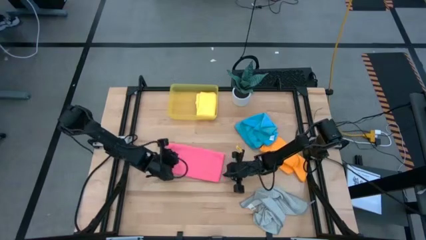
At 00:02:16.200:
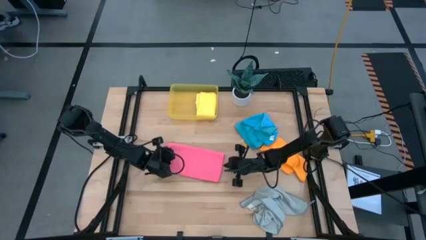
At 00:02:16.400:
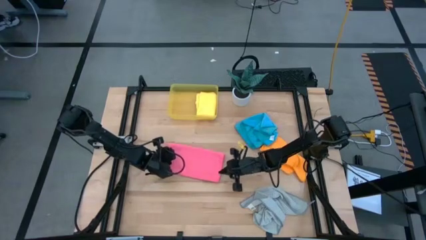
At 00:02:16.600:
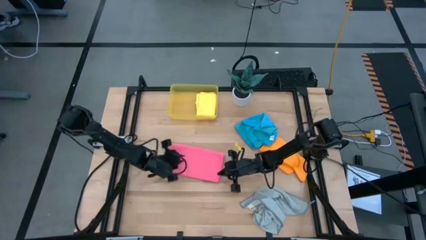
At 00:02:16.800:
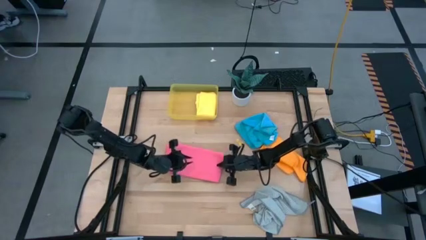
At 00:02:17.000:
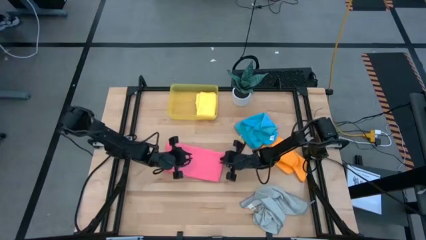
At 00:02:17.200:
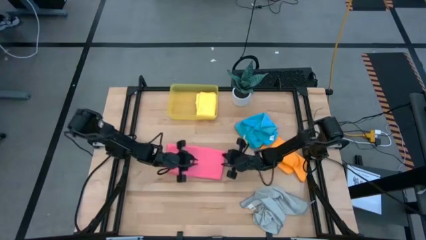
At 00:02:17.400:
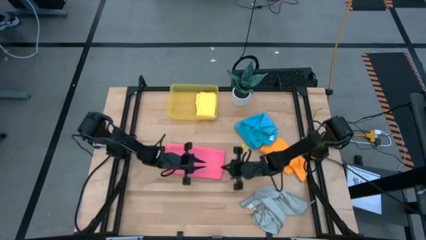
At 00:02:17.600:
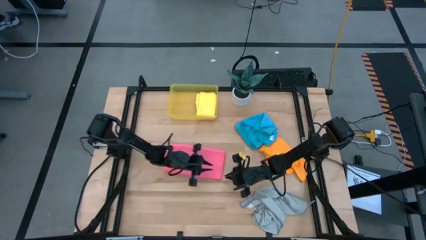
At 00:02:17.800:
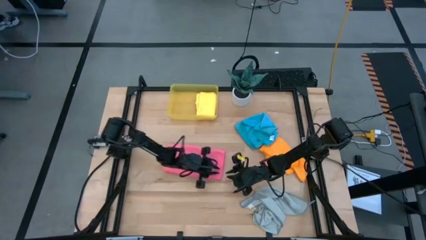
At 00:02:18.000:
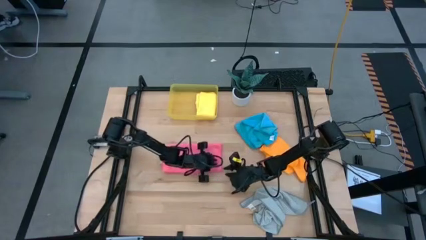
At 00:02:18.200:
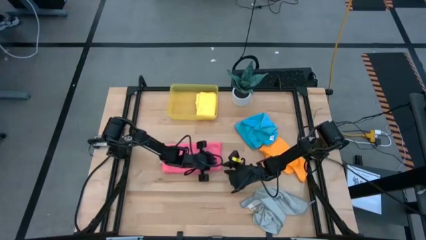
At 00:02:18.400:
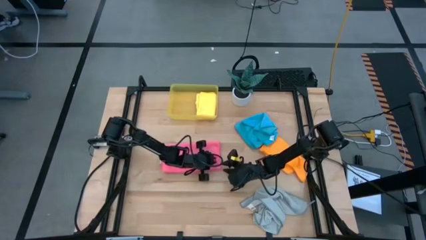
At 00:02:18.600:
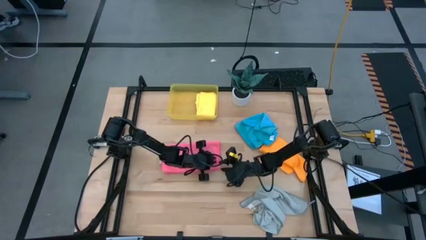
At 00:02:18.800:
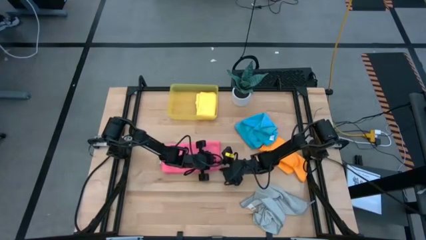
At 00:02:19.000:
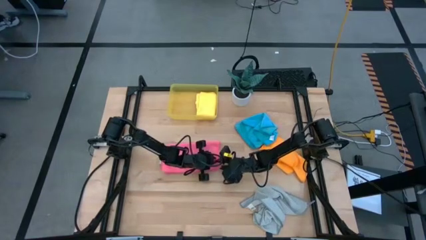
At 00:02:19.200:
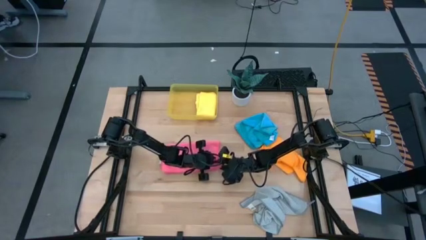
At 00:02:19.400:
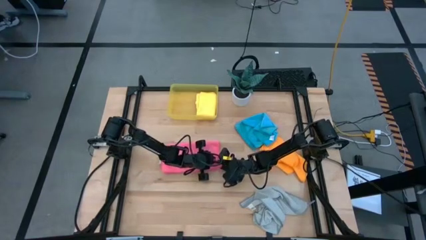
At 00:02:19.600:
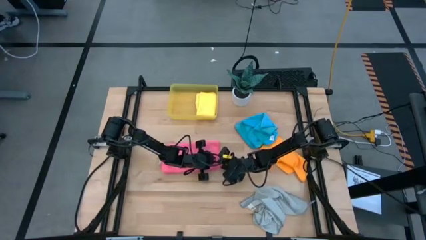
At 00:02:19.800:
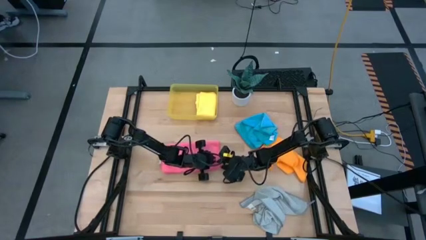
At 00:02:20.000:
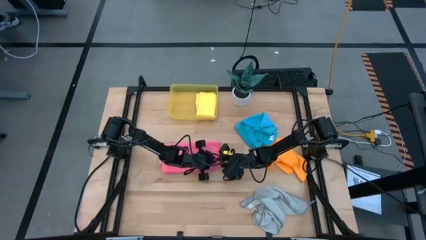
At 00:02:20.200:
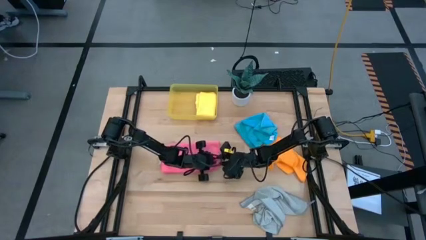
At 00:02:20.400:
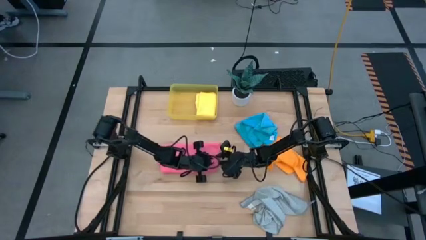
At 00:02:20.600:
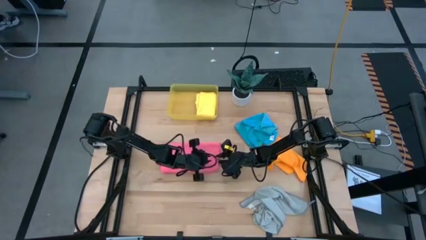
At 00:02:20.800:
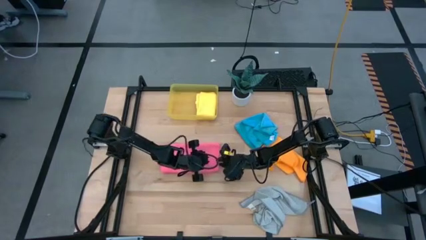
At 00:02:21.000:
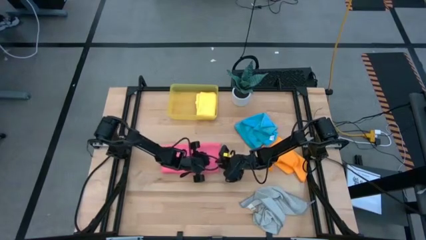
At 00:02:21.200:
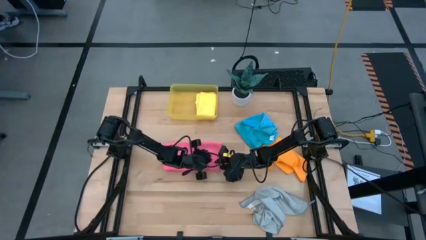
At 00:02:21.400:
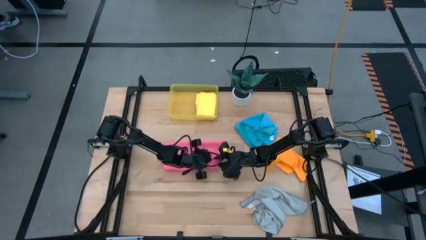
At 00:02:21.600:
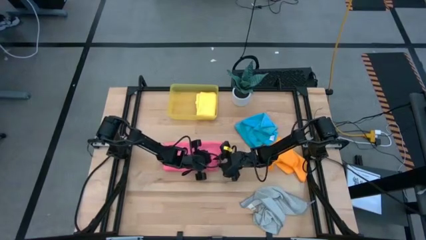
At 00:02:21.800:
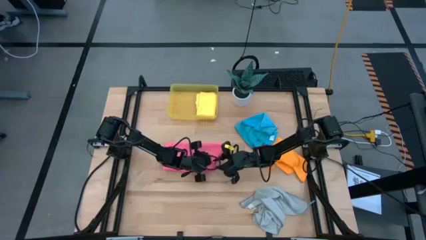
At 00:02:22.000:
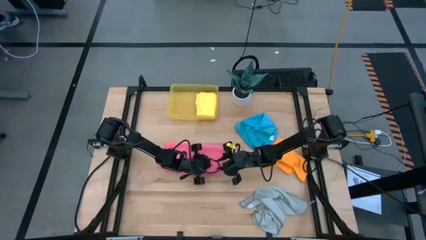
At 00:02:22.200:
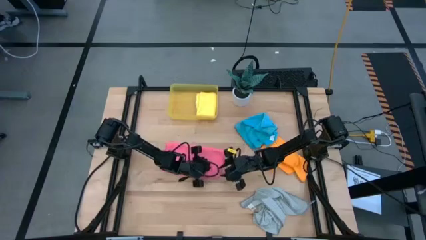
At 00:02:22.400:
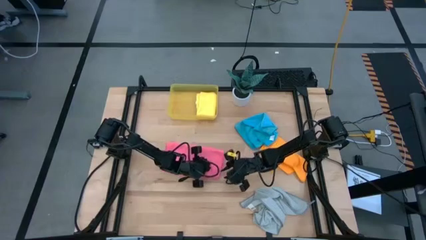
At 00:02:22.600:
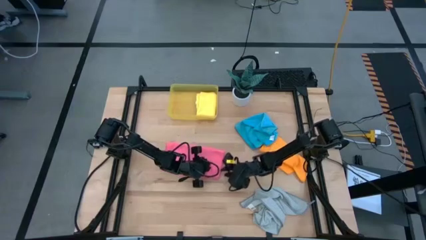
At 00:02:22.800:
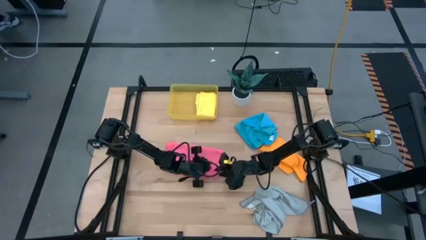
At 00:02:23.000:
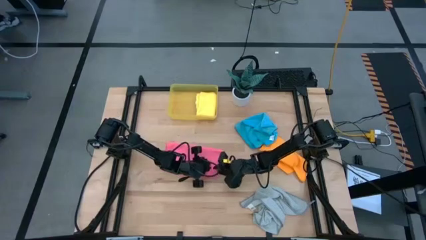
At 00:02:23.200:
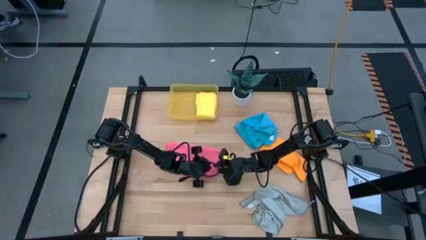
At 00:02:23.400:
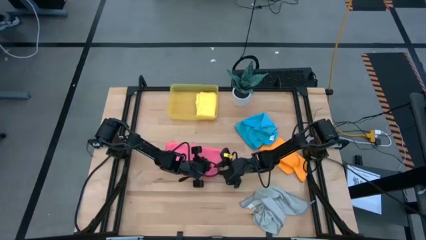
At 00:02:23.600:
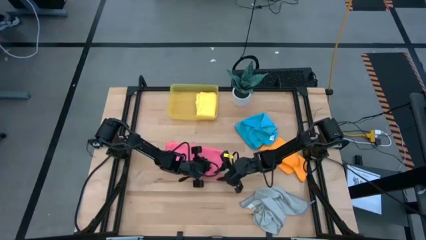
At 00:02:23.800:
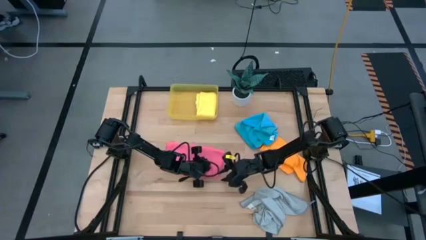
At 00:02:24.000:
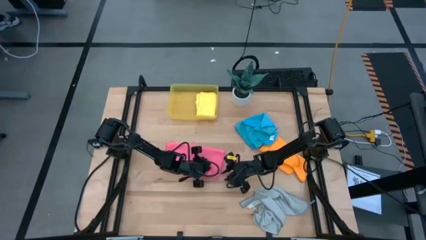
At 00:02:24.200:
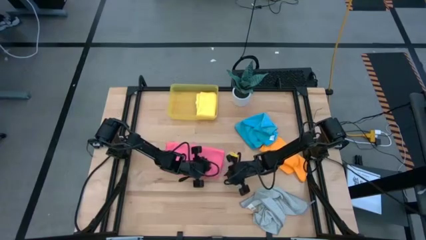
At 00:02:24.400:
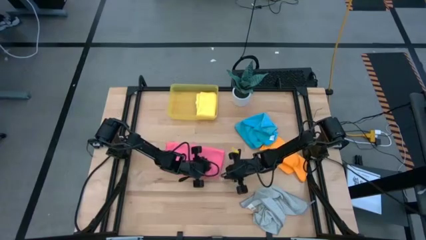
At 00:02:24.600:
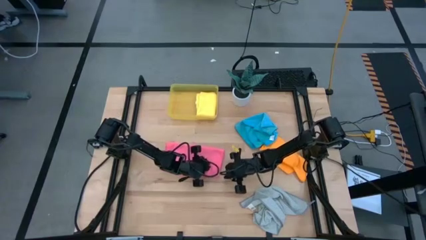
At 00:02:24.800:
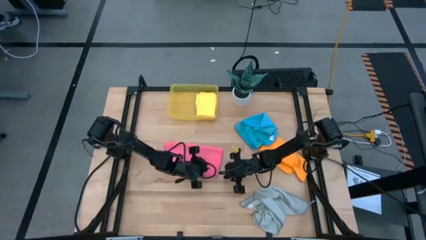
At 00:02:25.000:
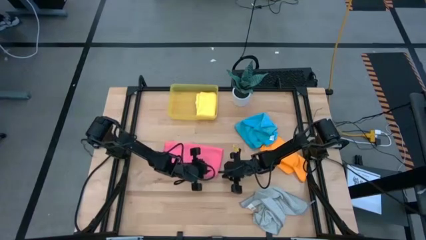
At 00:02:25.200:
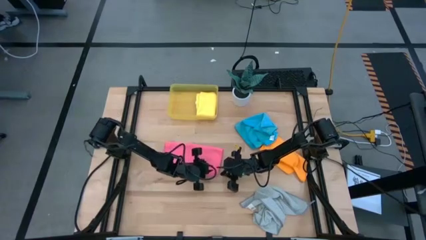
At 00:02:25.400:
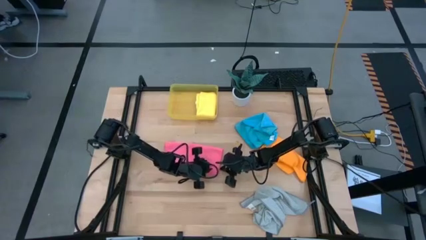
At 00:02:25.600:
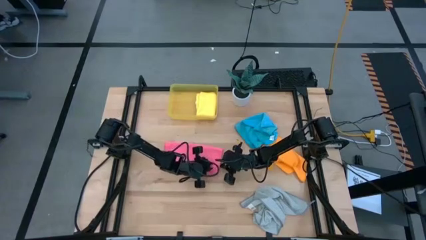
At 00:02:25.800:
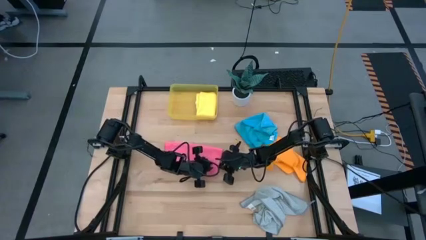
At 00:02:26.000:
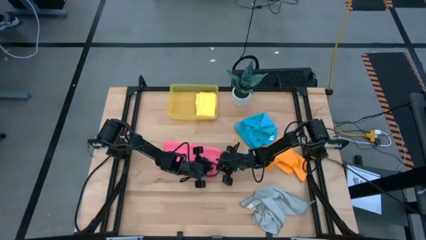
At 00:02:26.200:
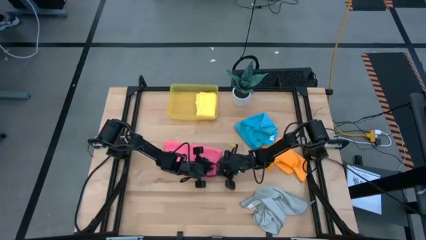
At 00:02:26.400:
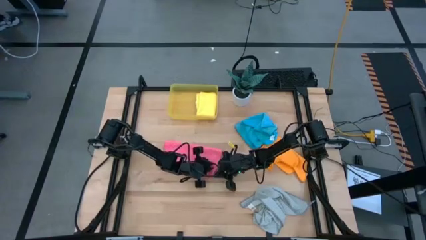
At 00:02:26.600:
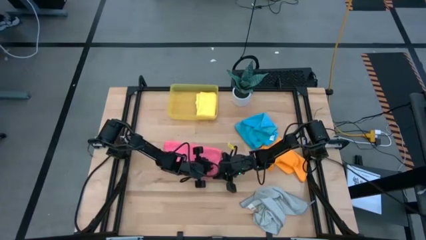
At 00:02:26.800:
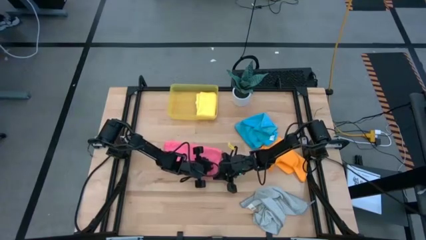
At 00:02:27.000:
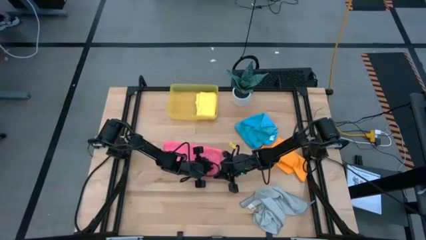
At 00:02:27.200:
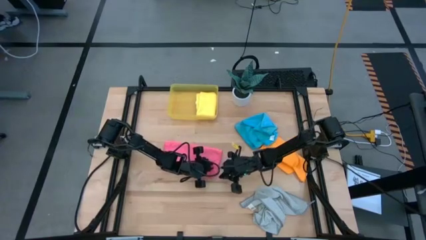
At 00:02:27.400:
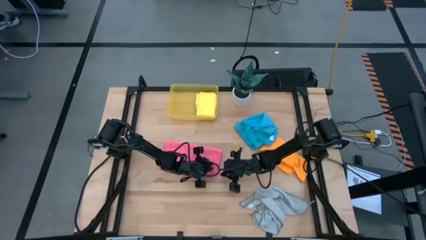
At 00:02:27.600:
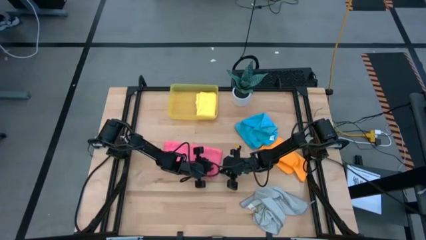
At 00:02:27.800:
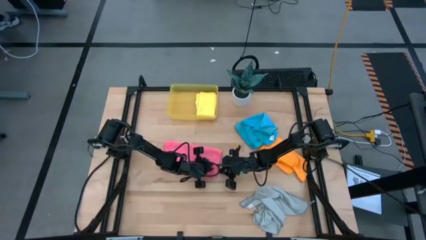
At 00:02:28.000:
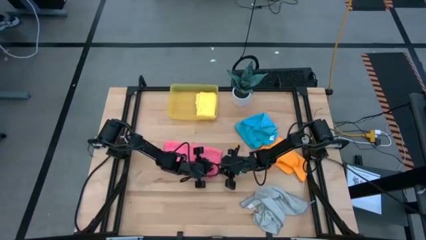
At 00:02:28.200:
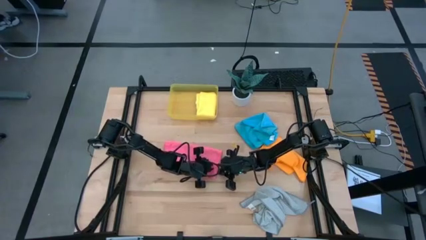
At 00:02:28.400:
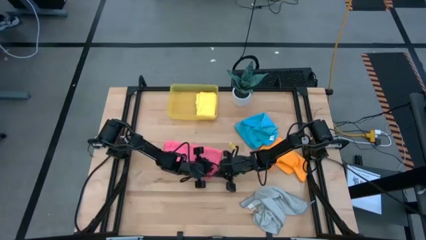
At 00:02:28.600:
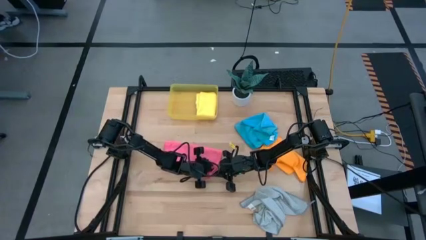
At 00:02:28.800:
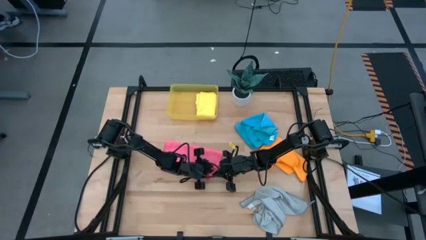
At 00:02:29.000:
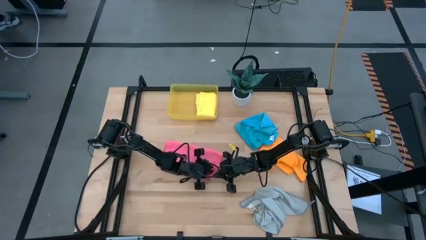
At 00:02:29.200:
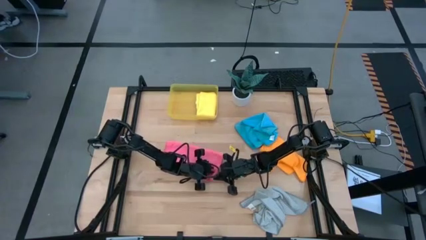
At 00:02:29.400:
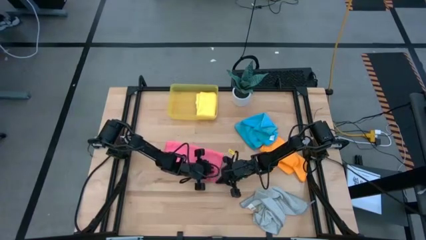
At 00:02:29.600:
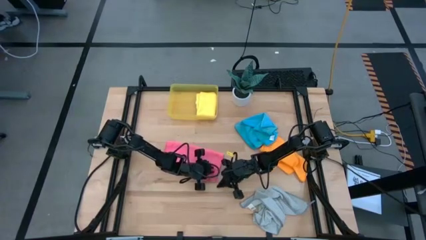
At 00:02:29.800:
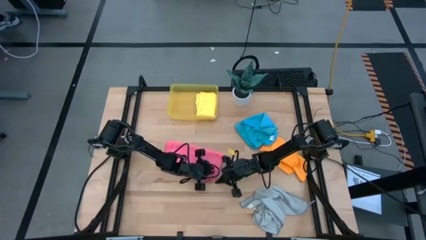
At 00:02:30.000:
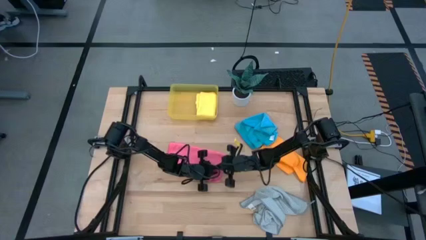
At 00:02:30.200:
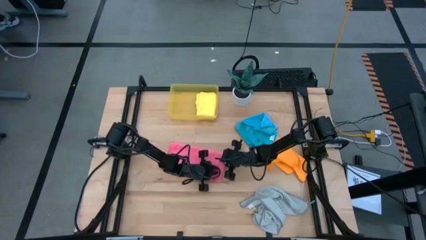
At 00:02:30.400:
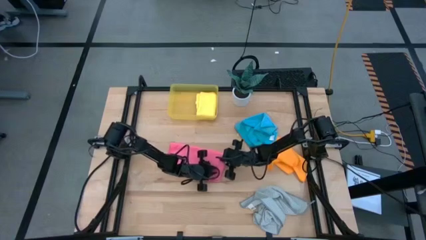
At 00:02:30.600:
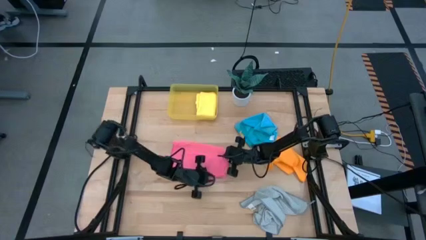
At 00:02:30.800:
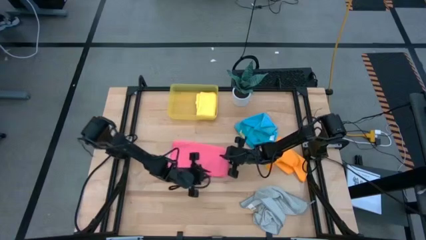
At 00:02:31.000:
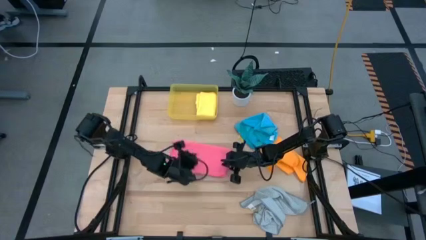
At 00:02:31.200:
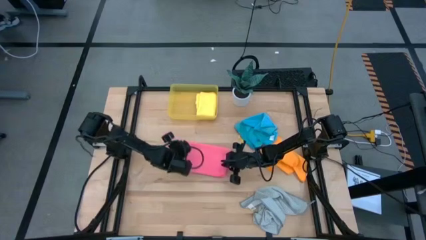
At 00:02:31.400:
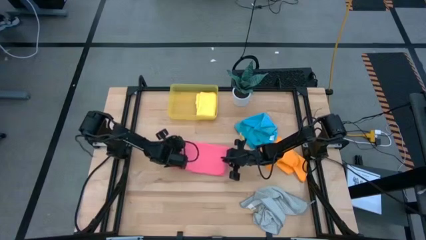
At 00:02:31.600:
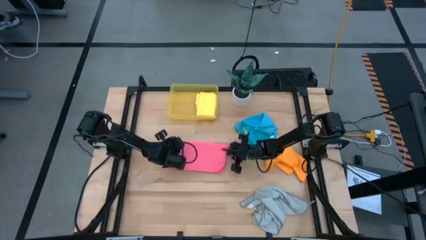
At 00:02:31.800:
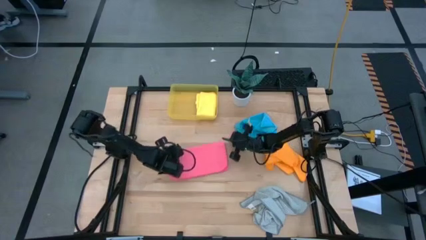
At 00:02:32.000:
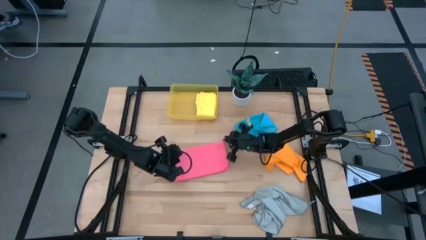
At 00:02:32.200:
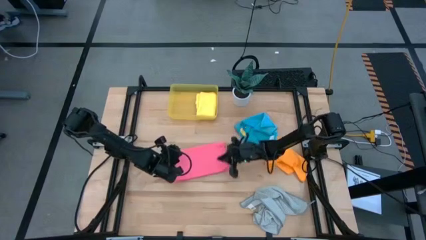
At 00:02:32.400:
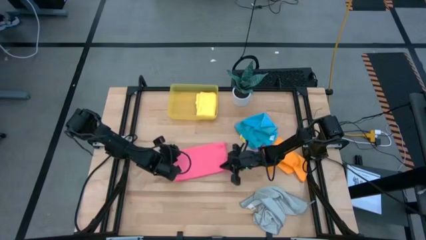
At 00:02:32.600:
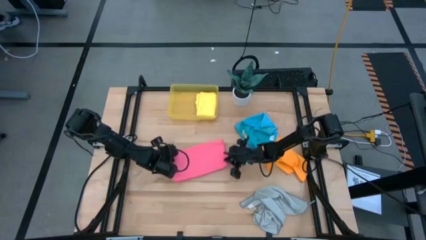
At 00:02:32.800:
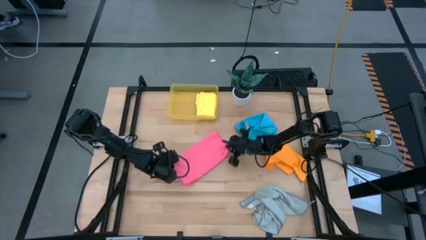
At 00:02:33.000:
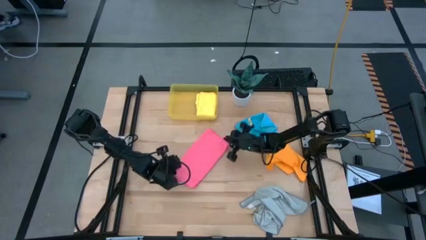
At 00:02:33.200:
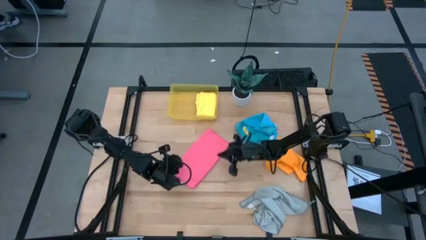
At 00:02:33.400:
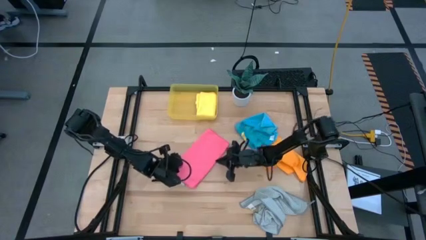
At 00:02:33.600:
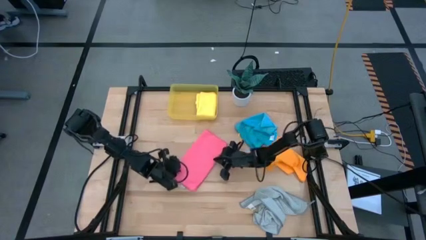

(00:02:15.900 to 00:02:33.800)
Task: Fold microfiber towels
Fold the pink microfiber cloth
